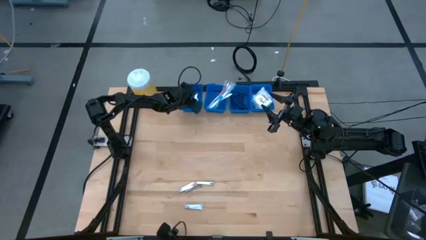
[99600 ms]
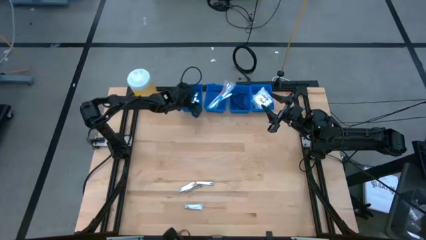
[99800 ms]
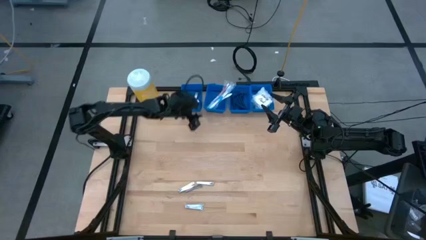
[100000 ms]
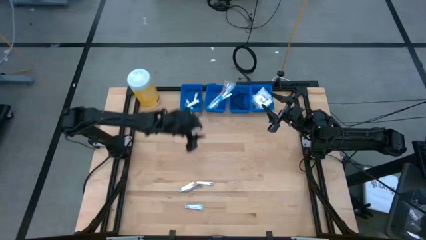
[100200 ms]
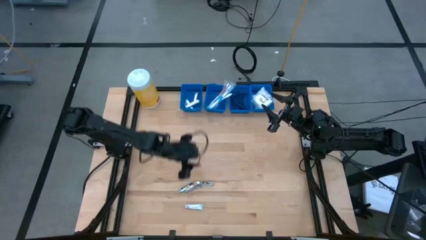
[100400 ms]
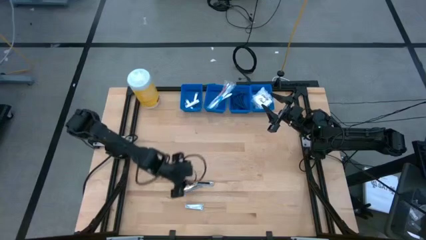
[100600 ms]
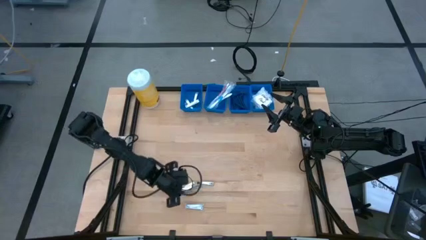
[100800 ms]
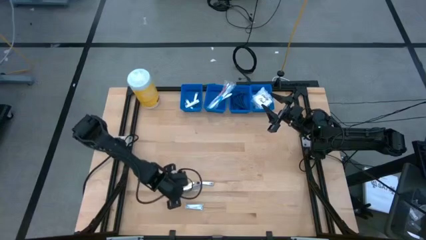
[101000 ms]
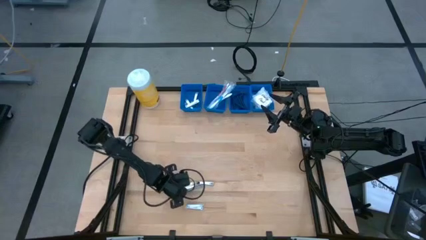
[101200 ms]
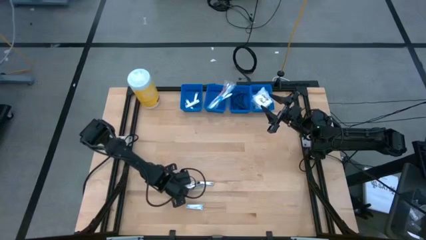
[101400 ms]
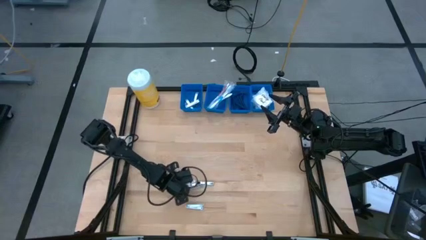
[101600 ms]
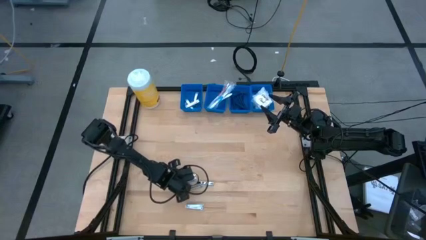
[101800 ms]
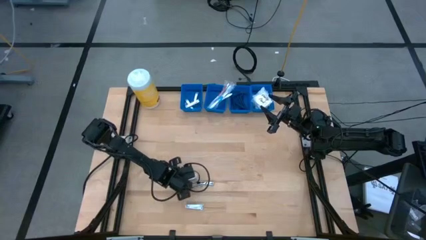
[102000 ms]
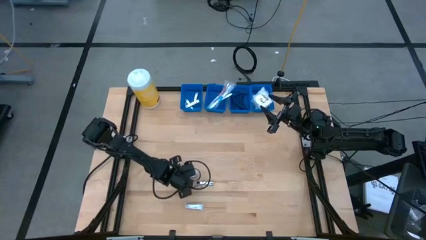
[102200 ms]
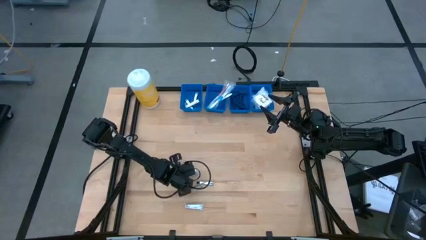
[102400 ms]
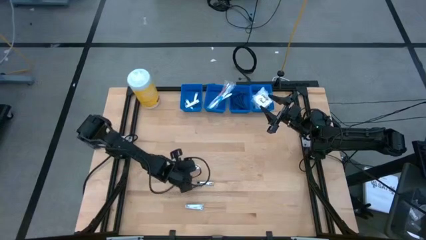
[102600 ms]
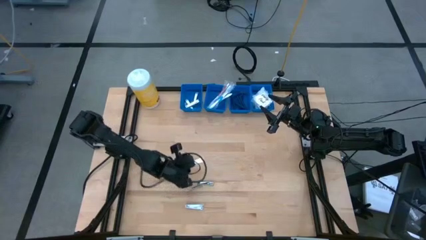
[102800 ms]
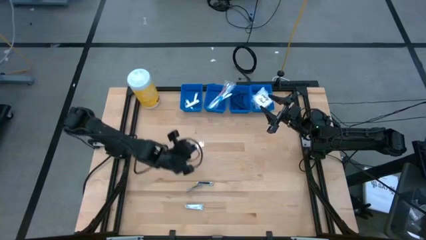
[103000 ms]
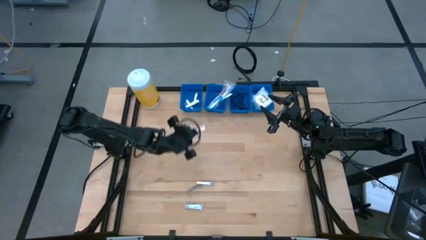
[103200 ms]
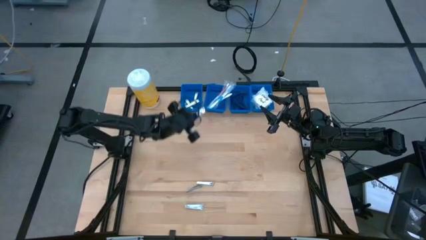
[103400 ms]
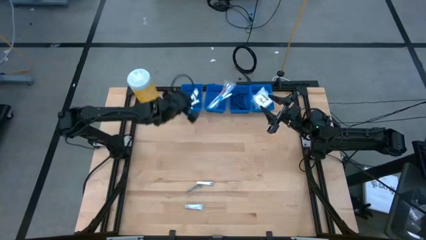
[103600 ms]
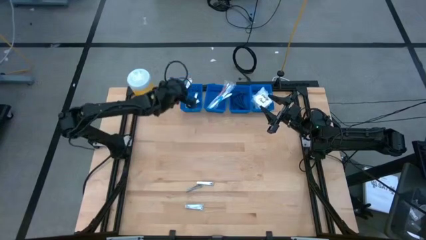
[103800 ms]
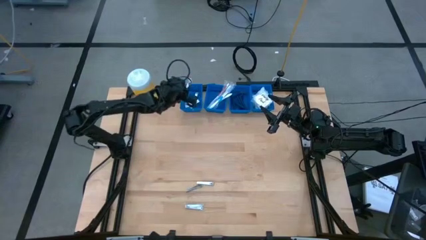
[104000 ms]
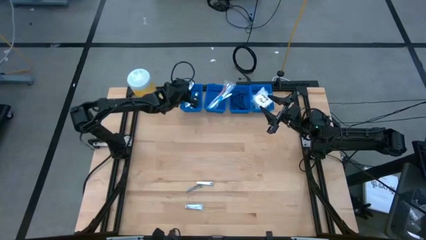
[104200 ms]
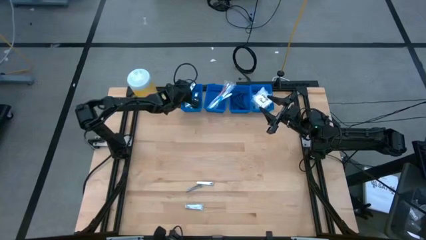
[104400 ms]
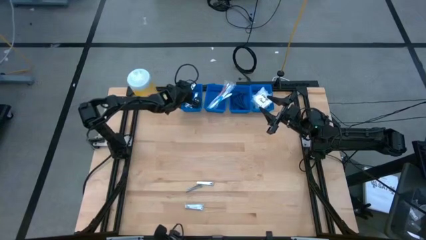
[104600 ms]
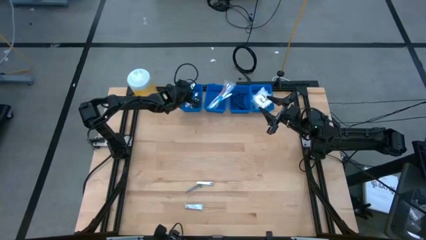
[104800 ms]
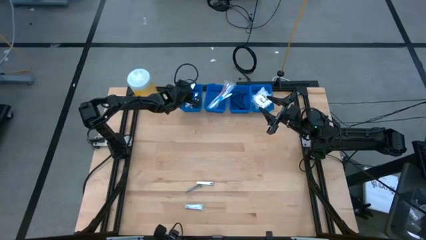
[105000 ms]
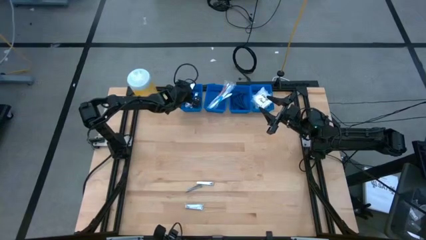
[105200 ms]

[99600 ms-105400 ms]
Task: Pick & Place Travel size toiletries
Put the silver nail cutter into the left blue basket

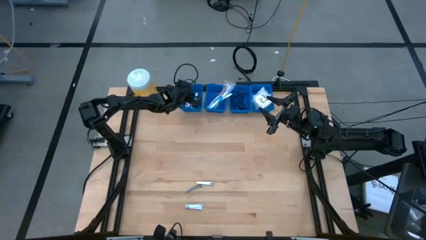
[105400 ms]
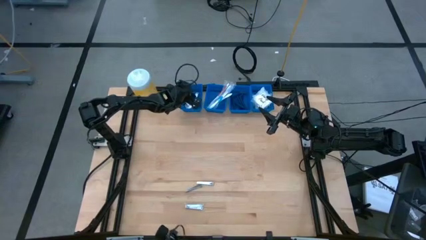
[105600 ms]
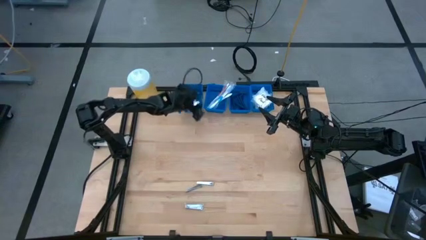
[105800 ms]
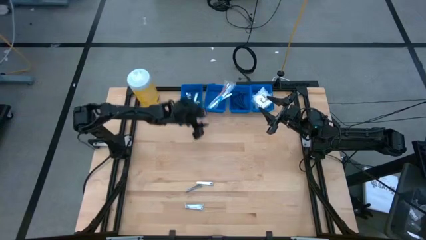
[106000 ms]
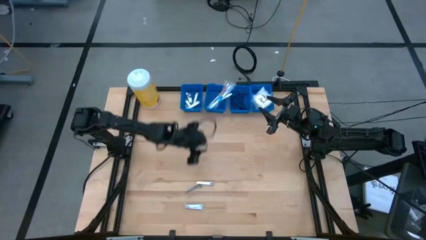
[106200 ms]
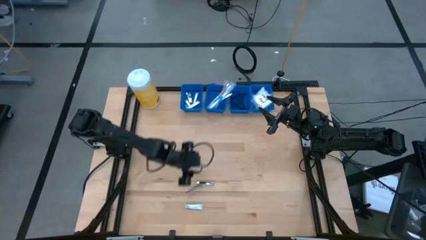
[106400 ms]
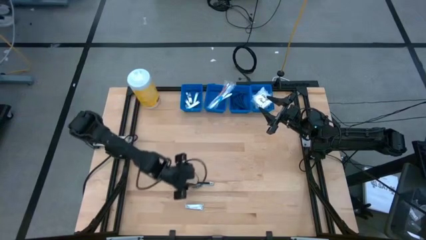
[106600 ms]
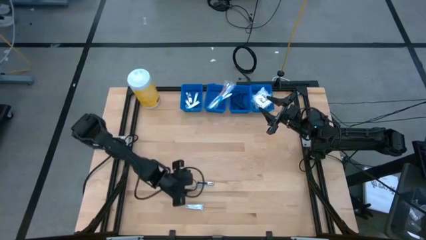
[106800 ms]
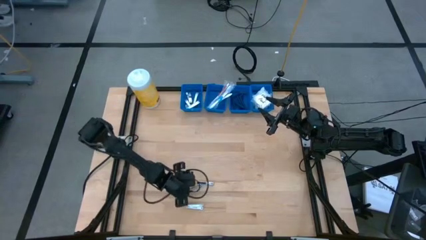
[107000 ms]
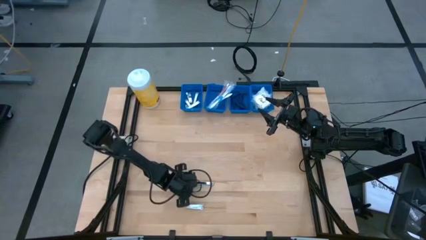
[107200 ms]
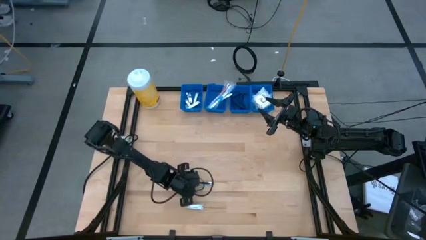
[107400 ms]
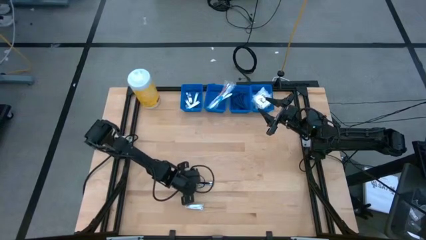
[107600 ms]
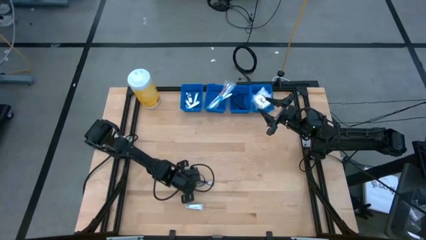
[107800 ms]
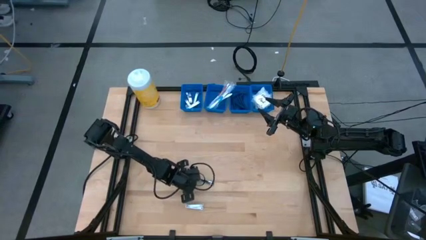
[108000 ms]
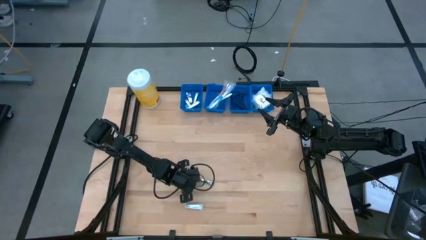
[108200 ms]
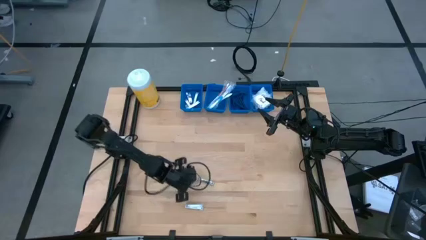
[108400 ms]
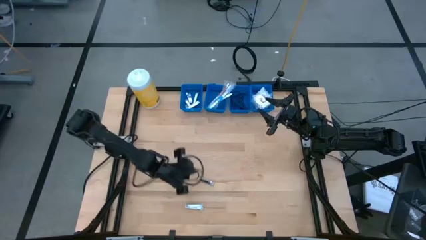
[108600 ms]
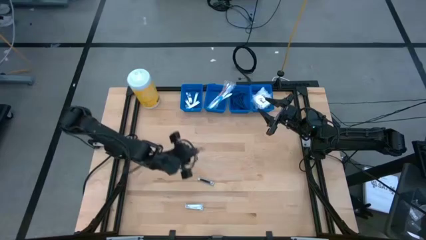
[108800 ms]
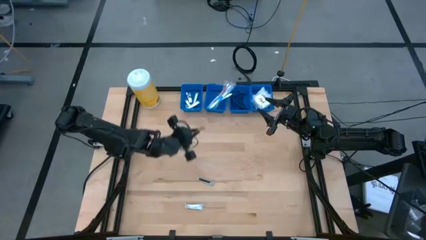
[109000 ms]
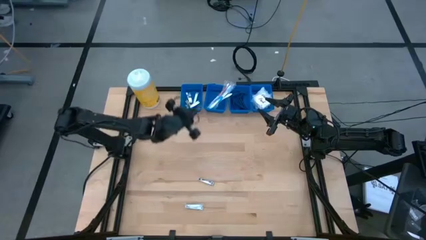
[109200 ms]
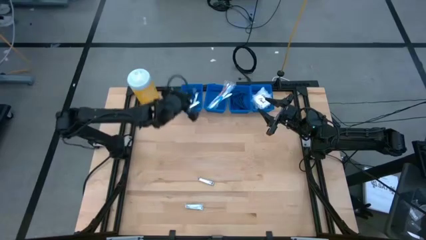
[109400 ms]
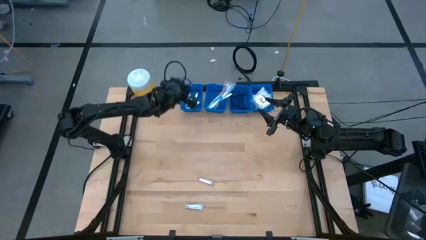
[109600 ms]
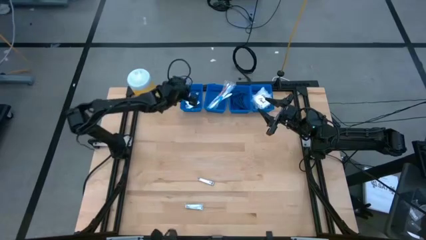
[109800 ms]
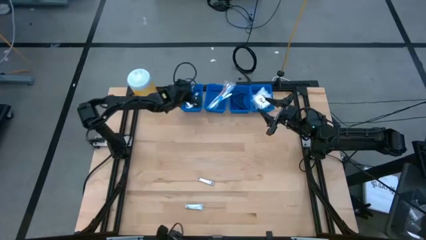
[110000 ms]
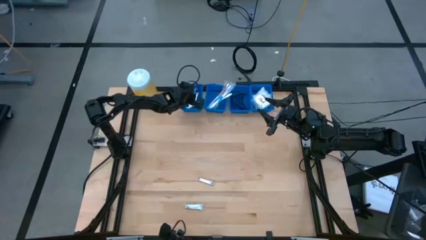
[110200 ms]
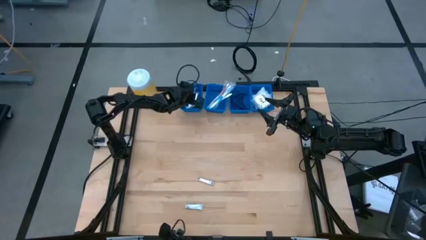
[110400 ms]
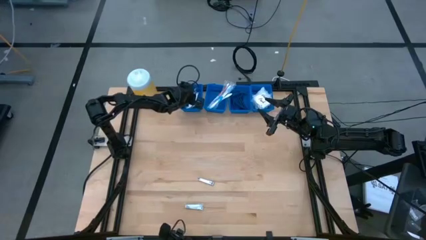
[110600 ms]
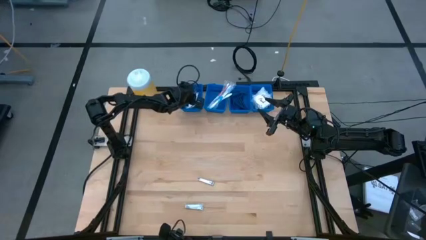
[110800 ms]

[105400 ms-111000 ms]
Put the silver nail cutter into the left blue basket

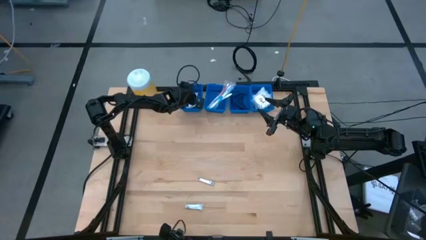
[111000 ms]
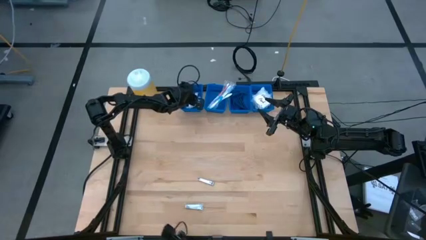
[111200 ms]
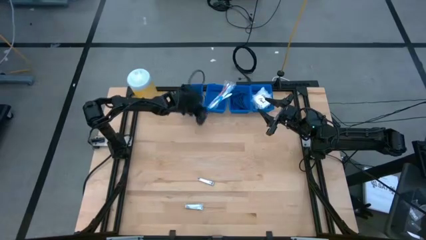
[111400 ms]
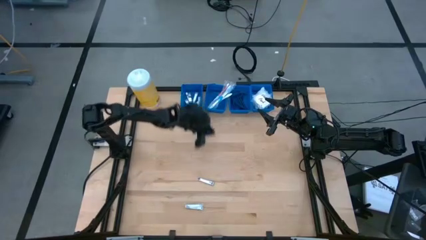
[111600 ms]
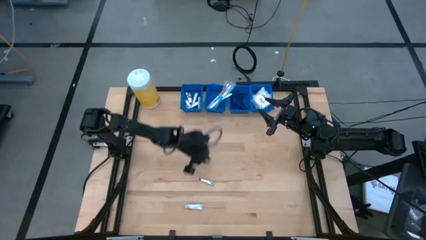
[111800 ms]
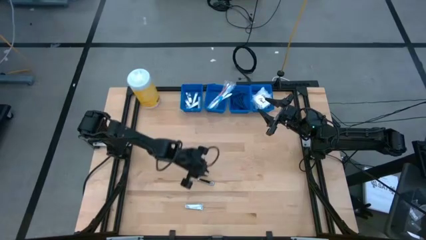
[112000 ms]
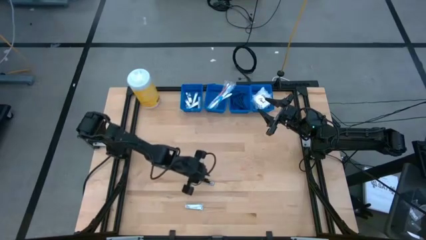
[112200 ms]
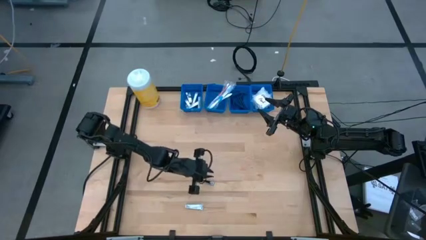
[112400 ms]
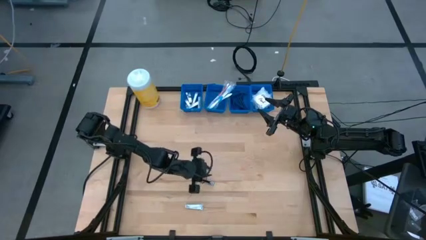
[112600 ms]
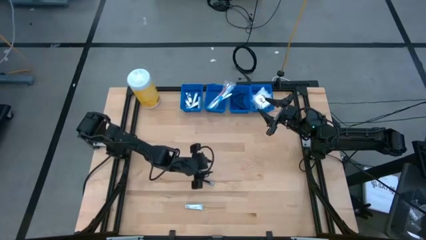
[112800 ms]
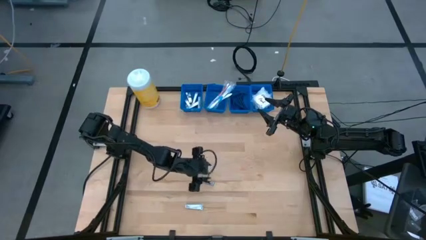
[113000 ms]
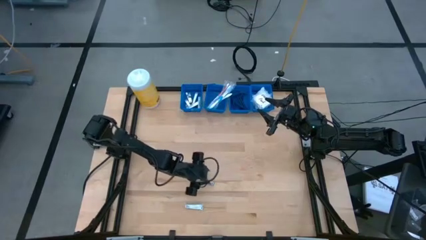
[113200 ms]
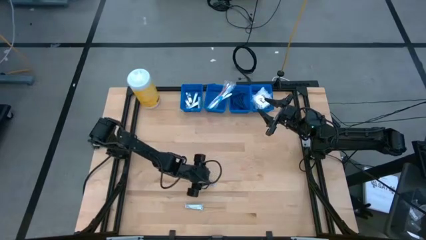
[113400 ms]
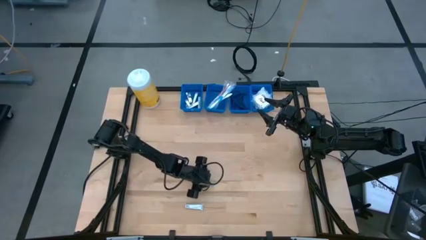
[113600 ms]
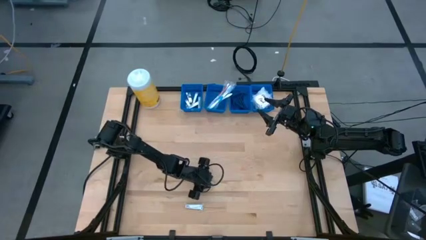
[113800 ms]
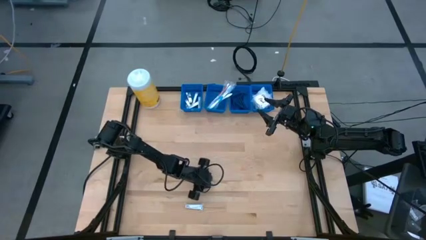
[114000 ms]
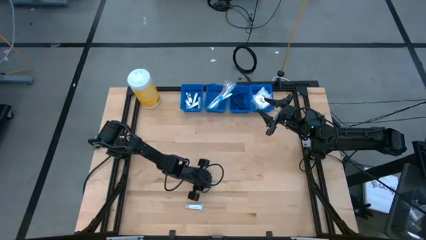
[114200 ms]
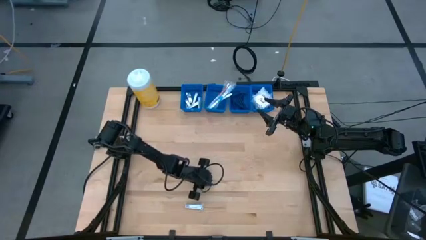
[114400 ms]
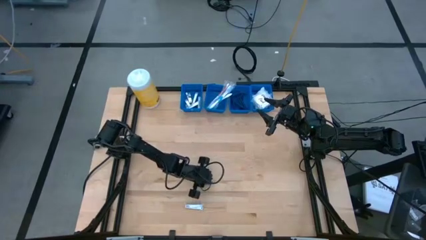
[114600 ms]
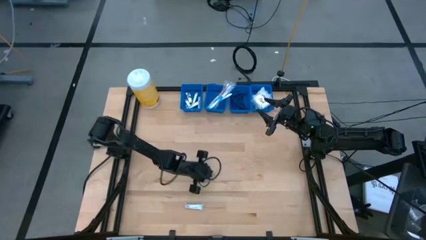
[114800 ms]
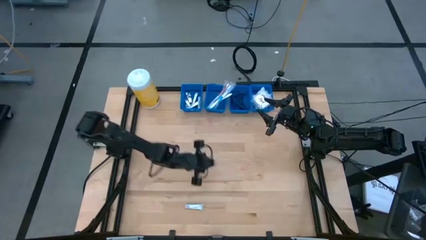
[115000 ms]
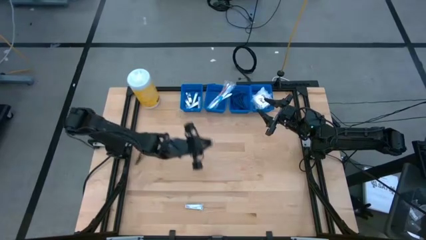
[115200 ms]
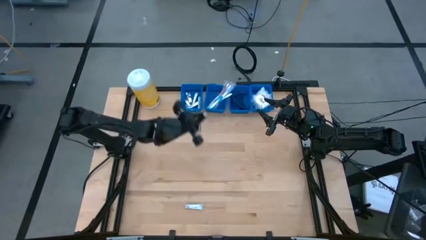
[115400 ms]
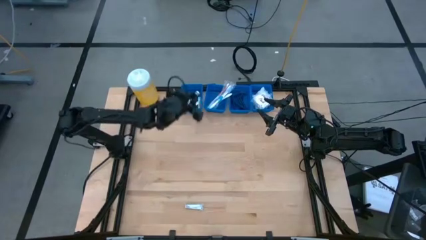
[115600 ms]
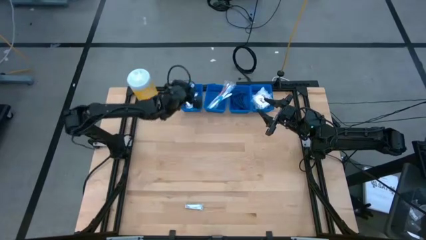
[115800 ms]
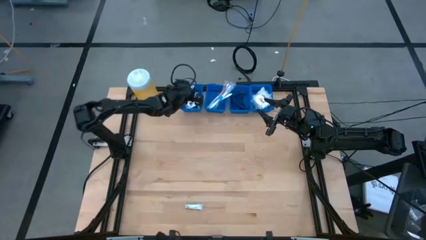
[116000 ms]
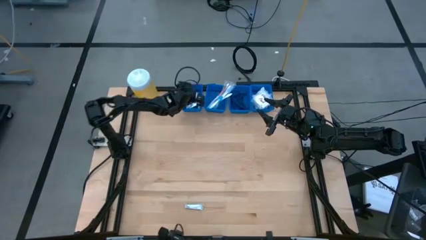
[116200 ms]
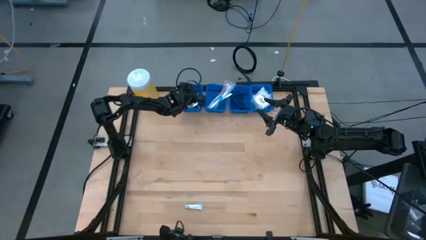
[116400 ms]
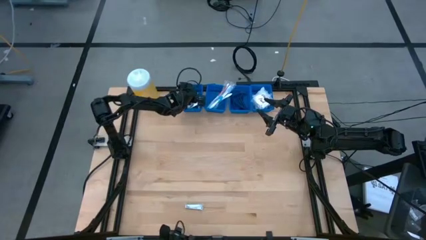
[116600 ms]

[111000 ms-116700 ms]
Put the silver nail cutter into the left blue basket
